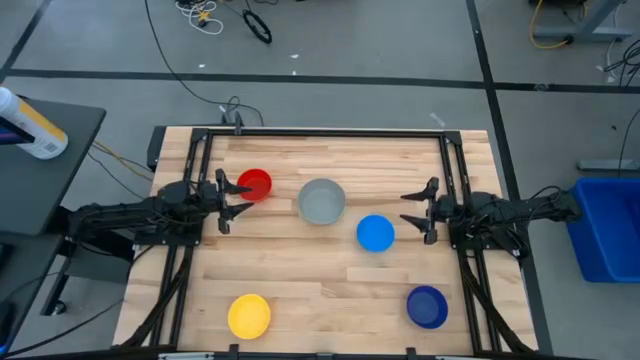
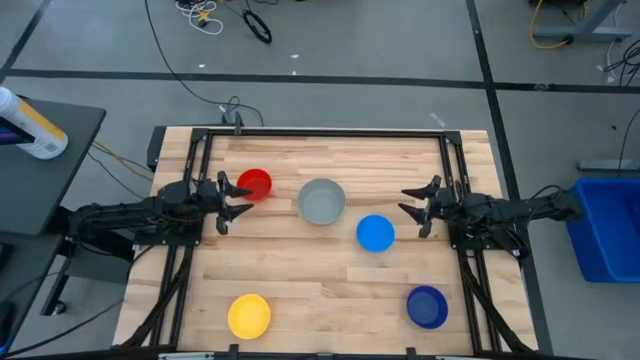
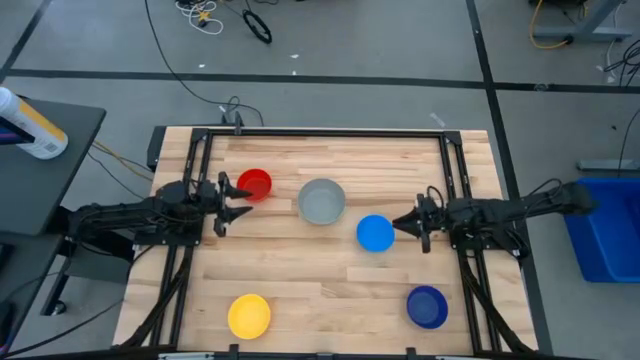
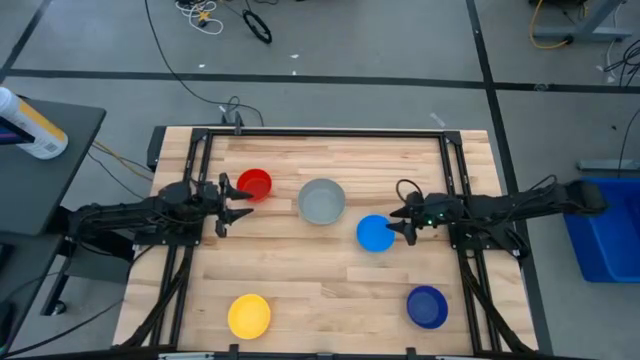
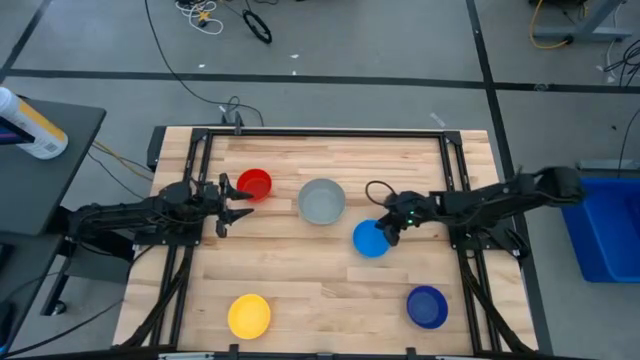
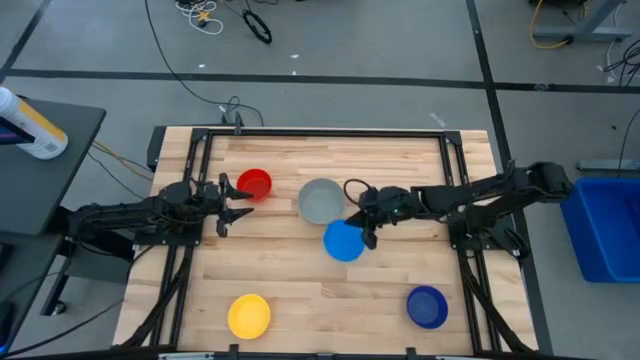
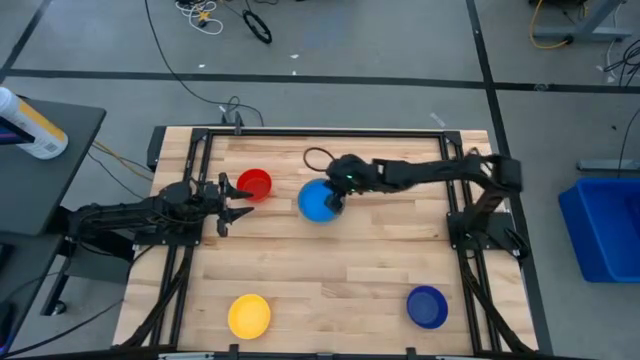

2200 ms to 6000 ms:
Stack the light blue bowl on the gray bowl

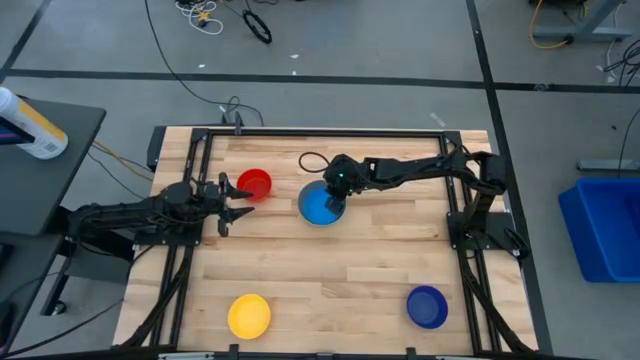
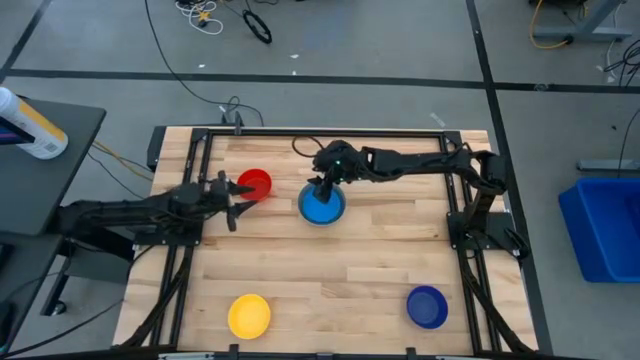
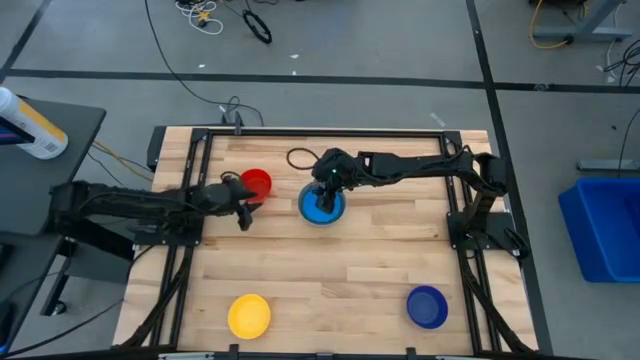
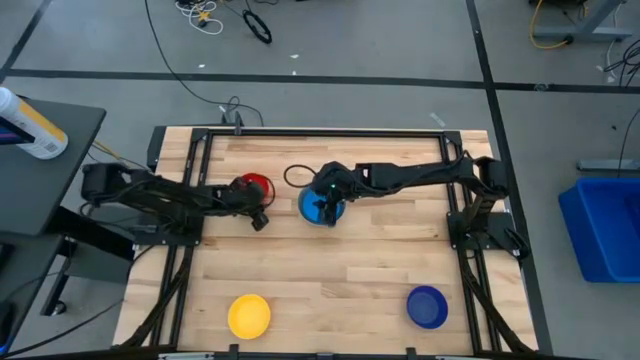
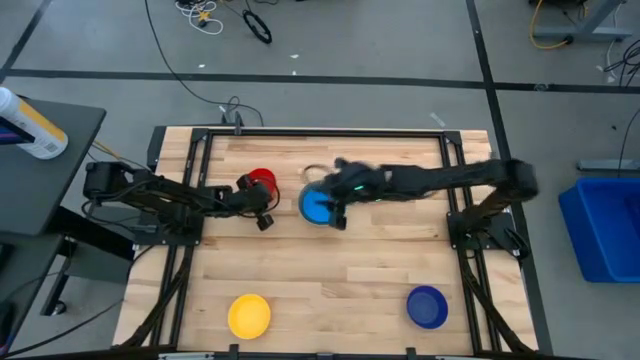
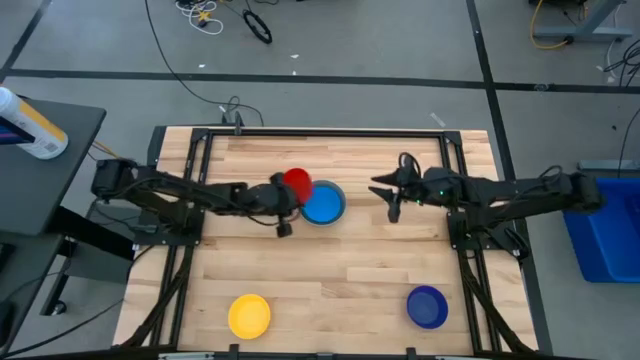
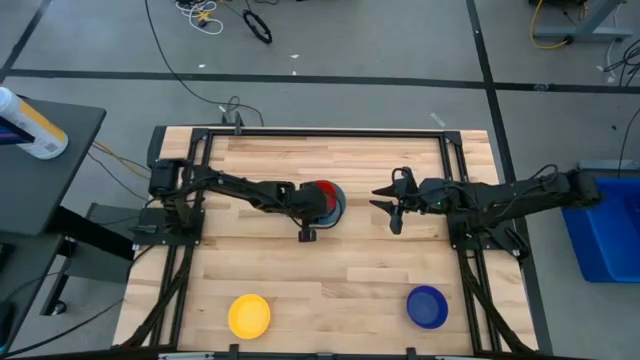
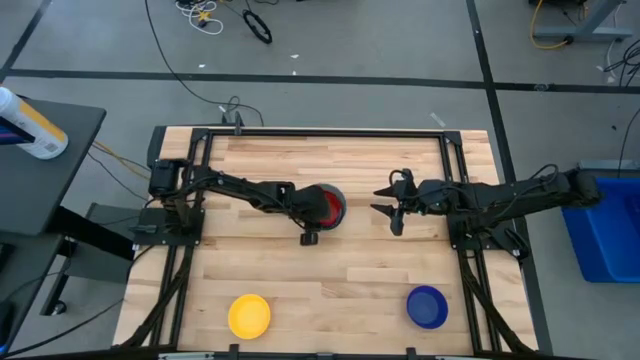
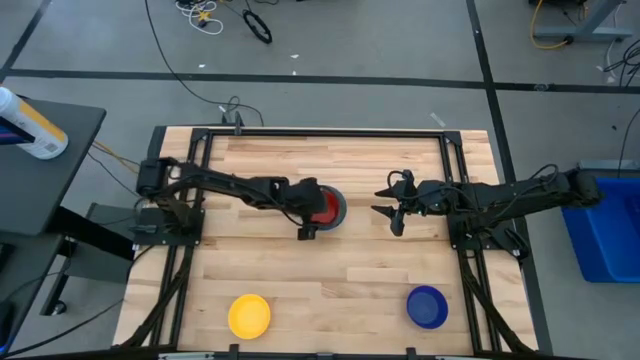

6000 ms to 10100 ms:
Stack the red bowl on the light blue bowl

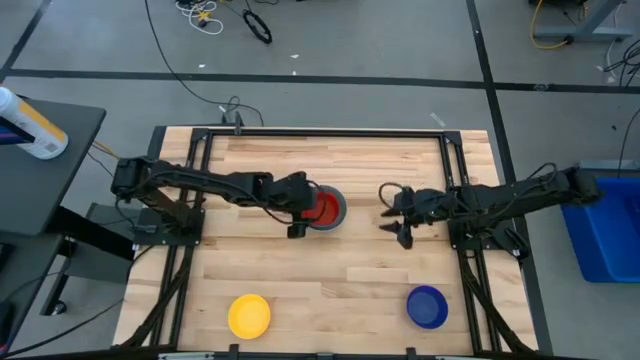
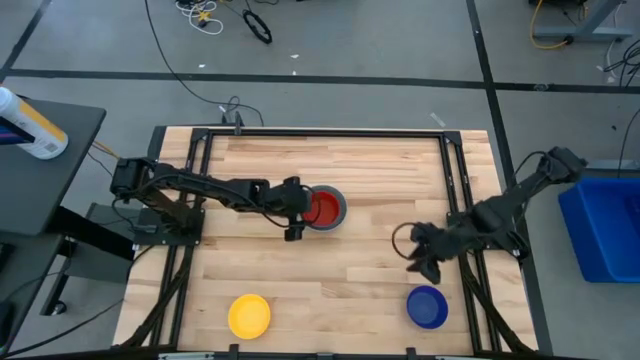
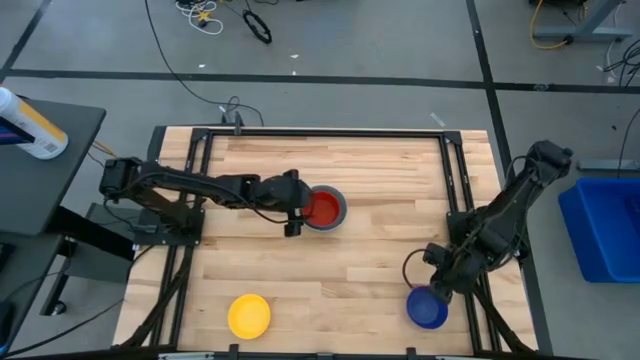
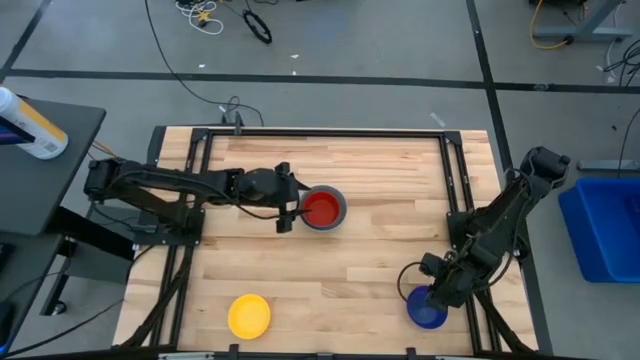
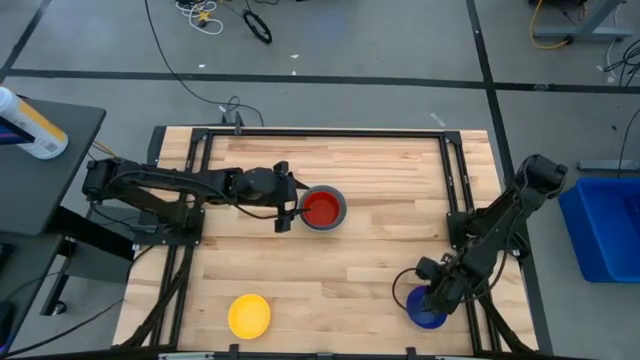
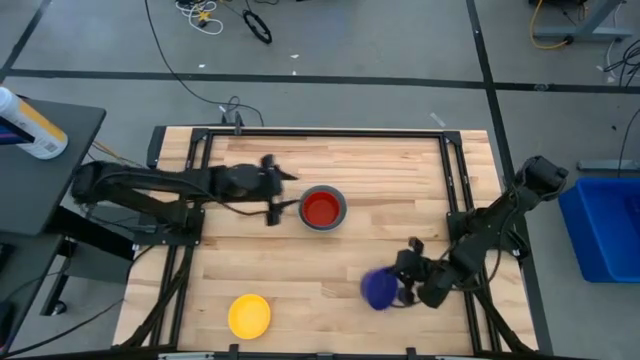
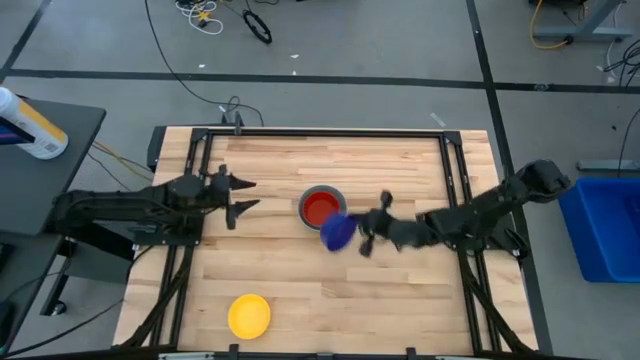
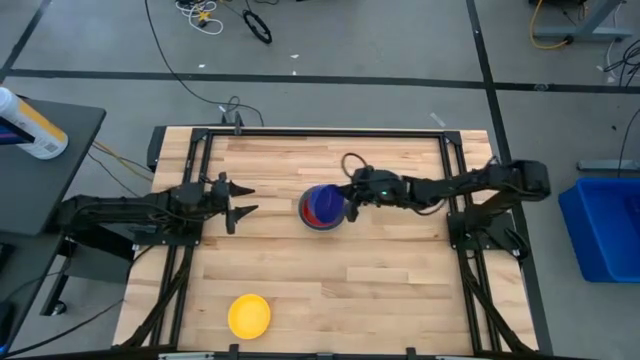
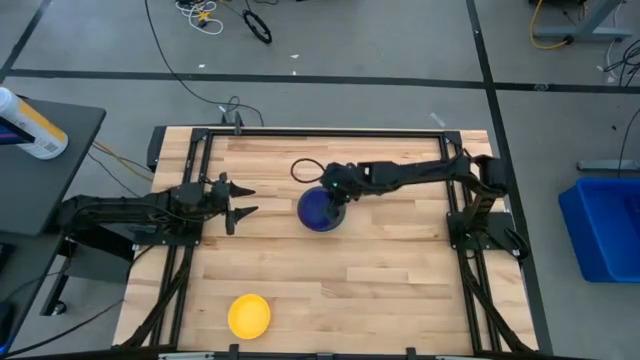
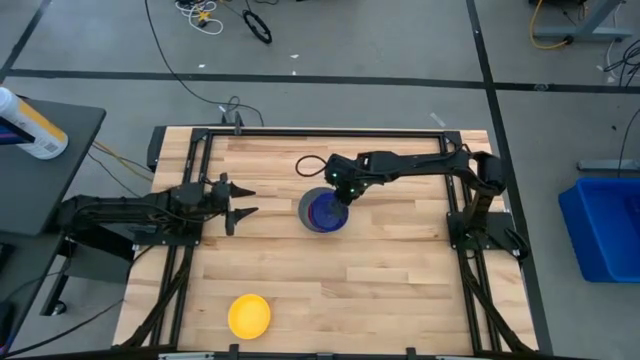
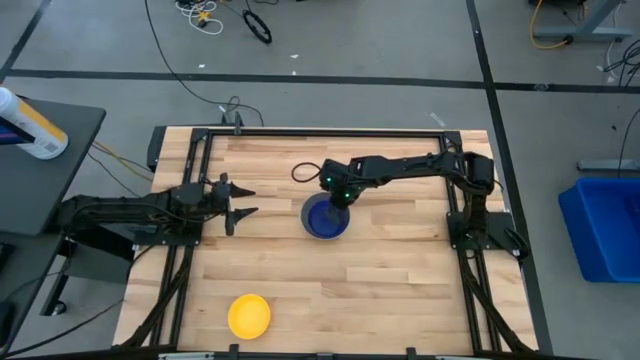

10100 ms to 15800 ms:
Stack the blue bowl on the red bowl

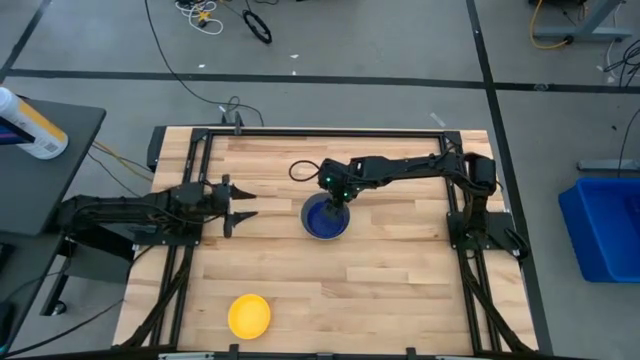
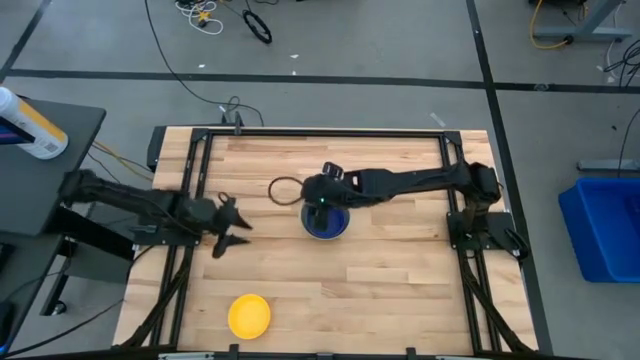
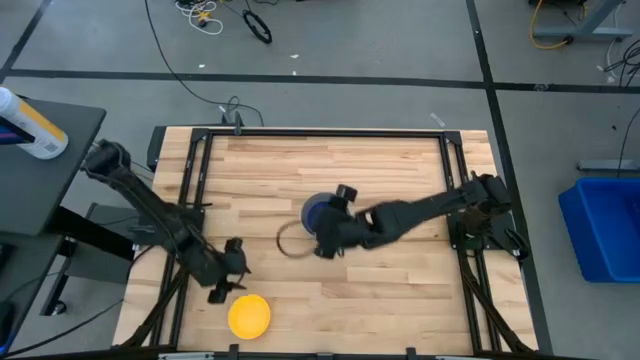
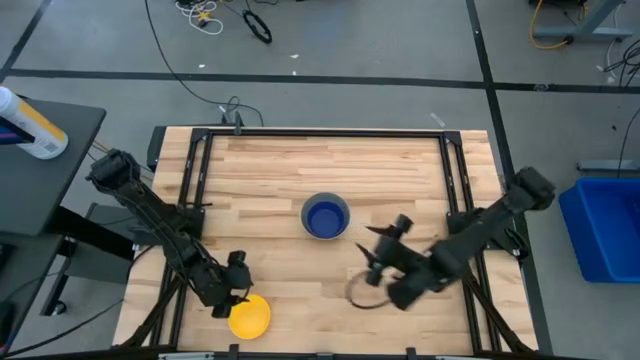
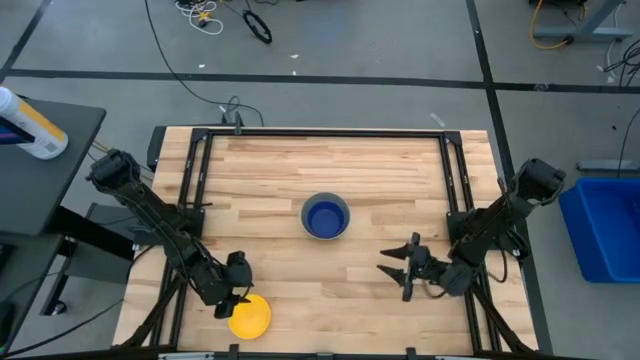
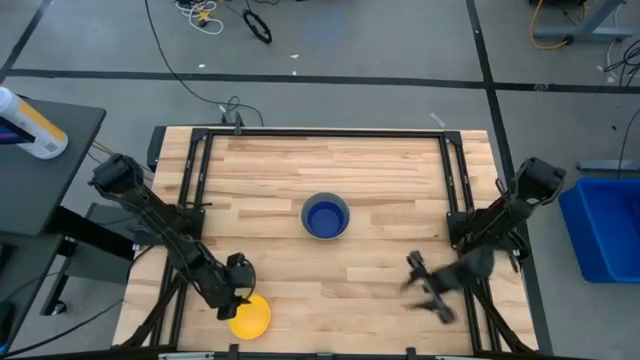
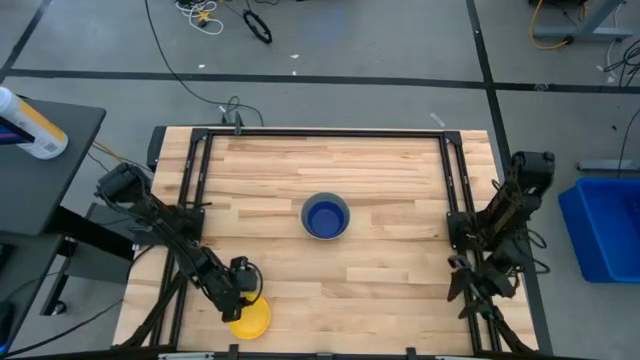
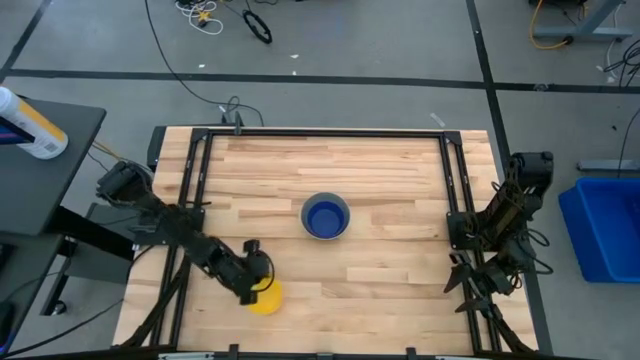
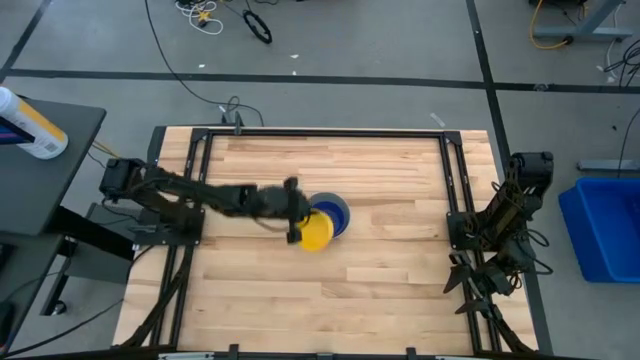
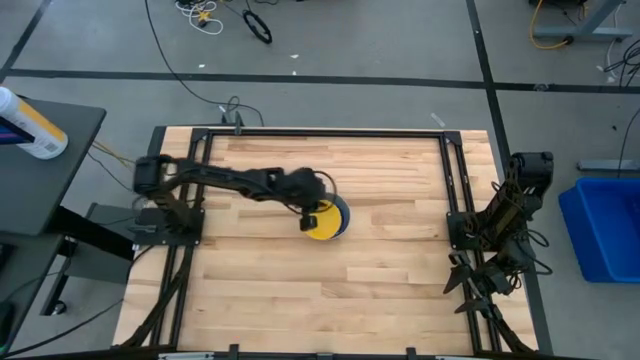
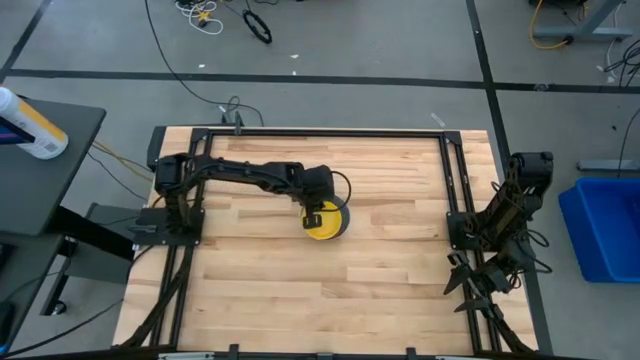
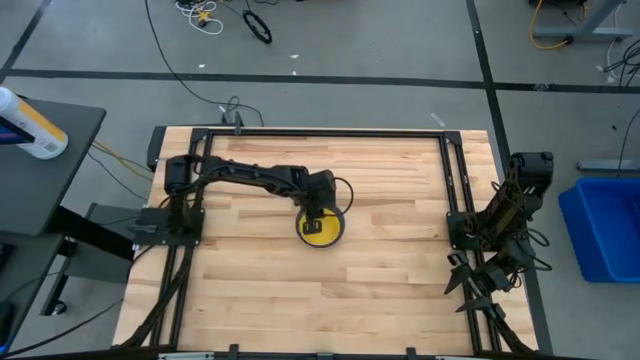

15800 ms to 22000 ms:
Stack the yellow bowl on the blue bowl
